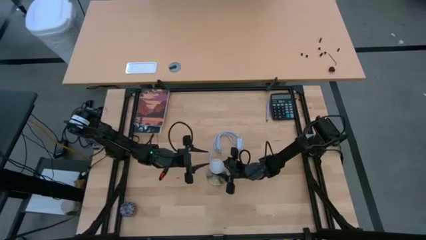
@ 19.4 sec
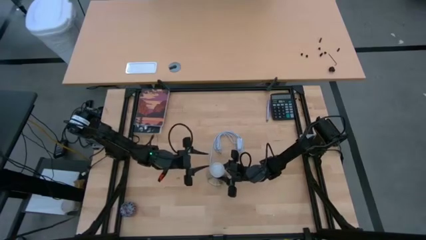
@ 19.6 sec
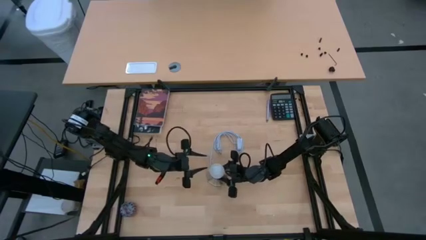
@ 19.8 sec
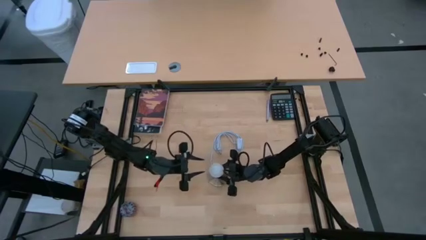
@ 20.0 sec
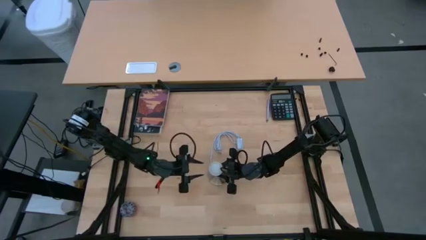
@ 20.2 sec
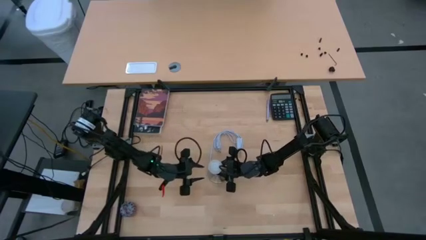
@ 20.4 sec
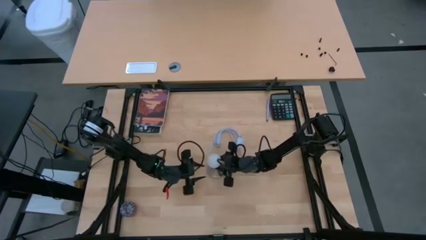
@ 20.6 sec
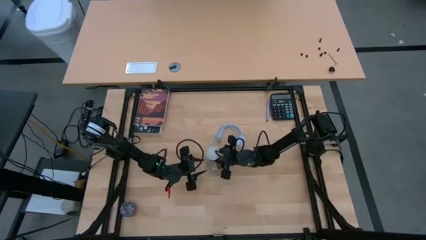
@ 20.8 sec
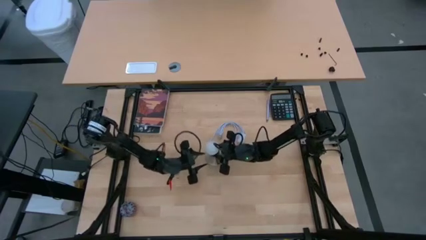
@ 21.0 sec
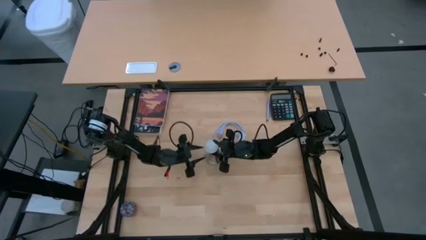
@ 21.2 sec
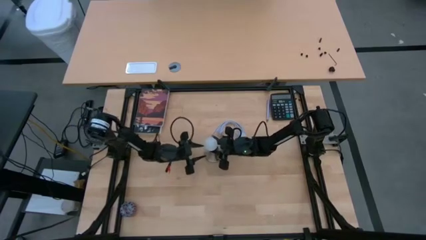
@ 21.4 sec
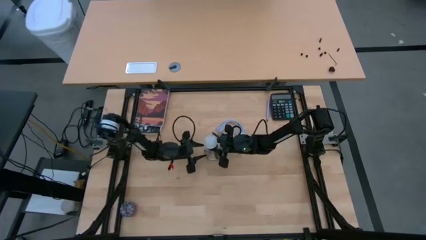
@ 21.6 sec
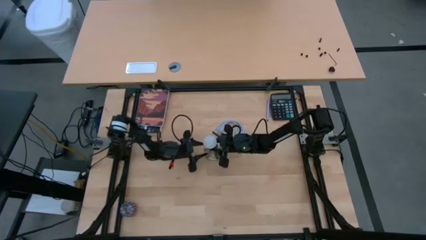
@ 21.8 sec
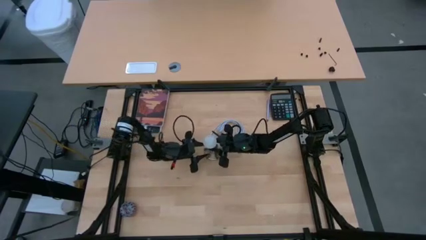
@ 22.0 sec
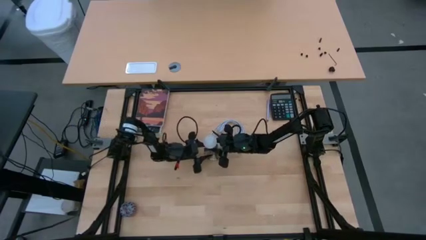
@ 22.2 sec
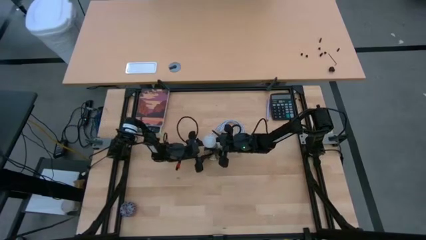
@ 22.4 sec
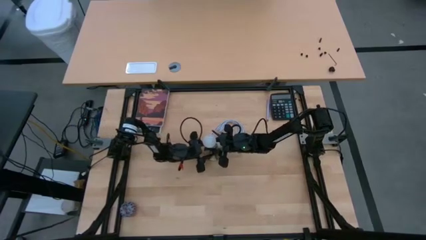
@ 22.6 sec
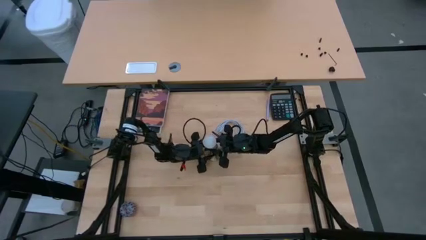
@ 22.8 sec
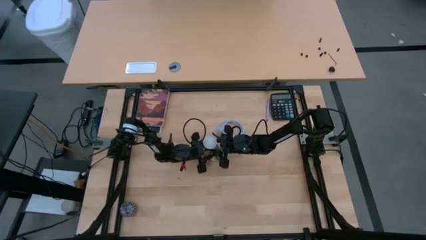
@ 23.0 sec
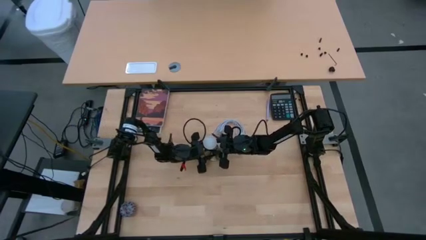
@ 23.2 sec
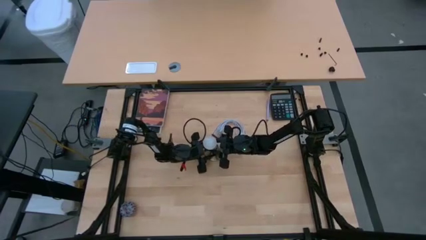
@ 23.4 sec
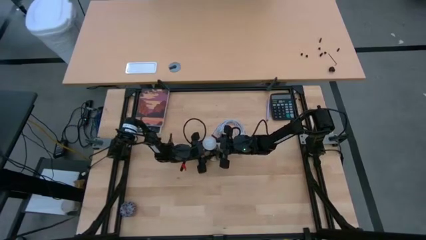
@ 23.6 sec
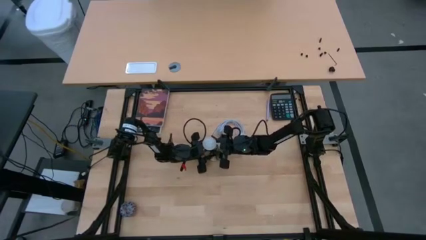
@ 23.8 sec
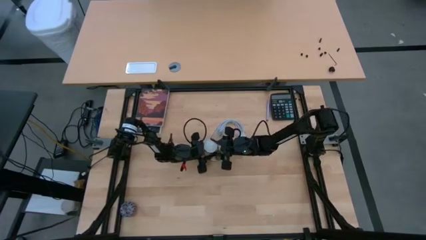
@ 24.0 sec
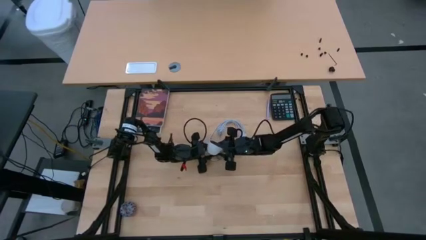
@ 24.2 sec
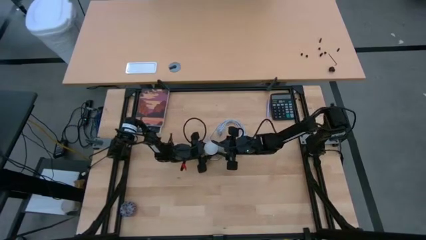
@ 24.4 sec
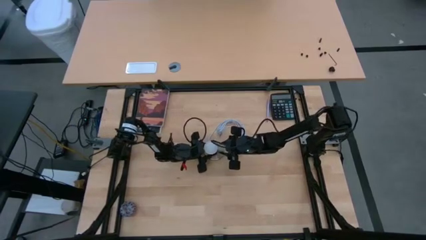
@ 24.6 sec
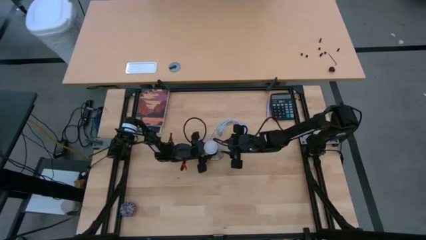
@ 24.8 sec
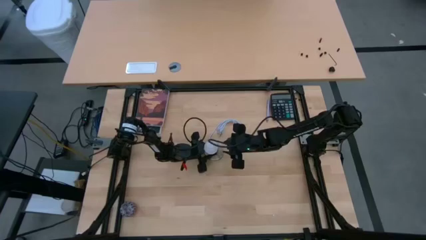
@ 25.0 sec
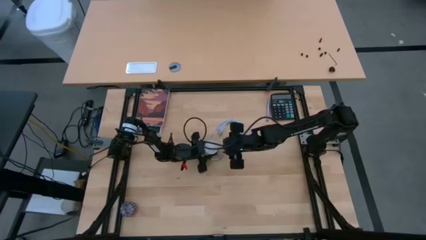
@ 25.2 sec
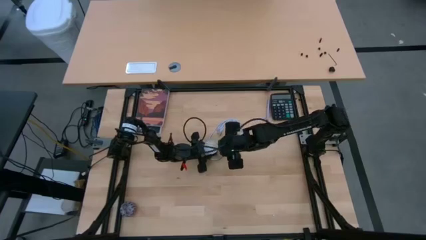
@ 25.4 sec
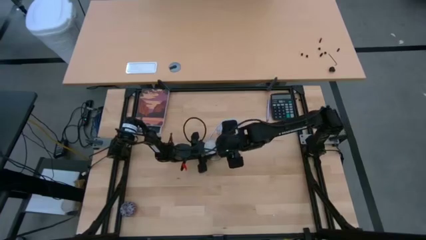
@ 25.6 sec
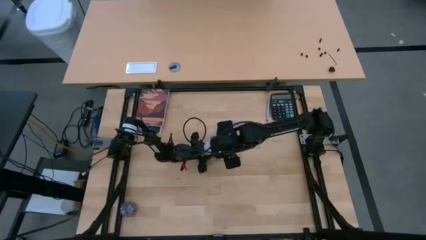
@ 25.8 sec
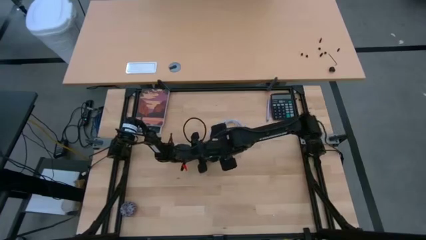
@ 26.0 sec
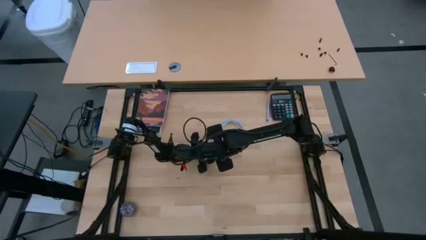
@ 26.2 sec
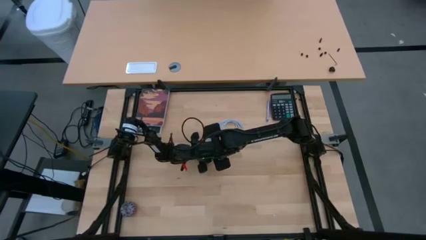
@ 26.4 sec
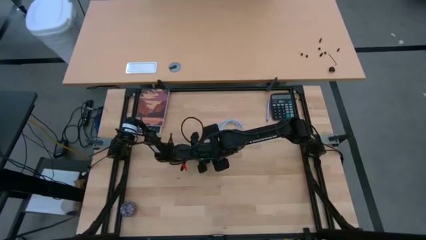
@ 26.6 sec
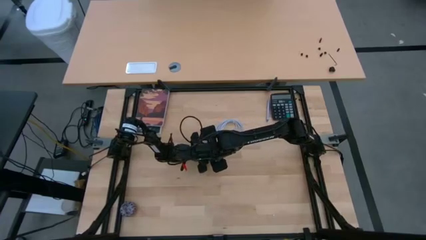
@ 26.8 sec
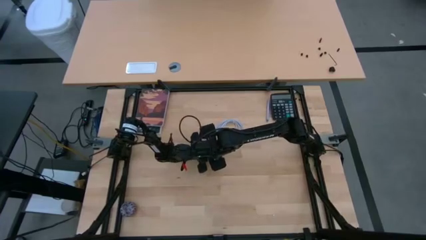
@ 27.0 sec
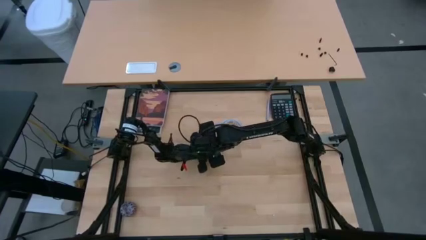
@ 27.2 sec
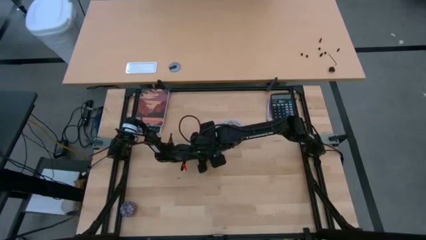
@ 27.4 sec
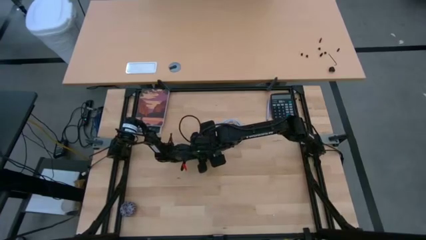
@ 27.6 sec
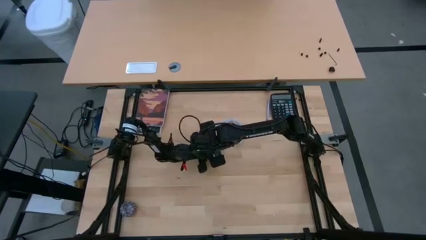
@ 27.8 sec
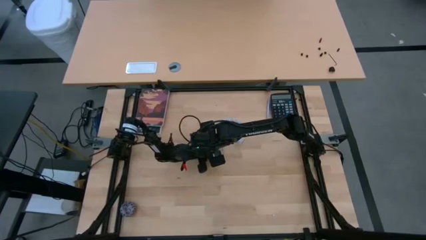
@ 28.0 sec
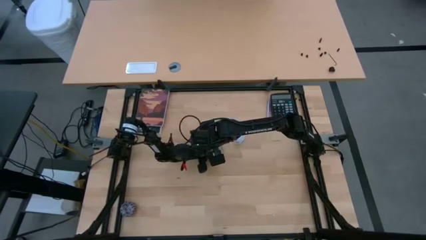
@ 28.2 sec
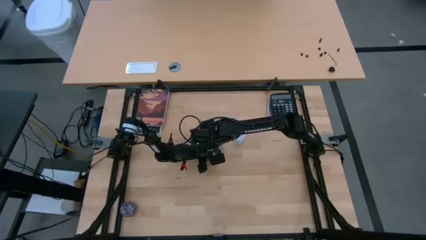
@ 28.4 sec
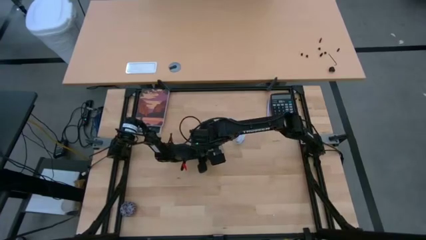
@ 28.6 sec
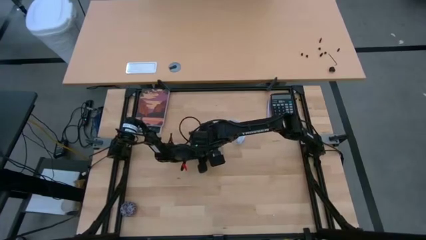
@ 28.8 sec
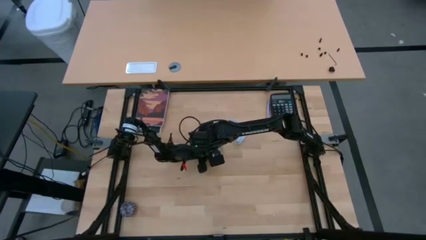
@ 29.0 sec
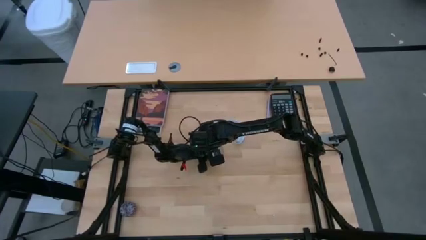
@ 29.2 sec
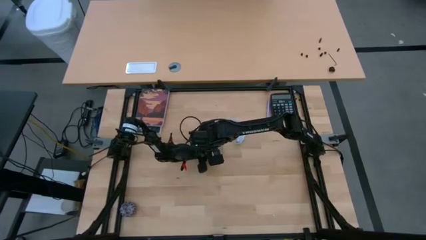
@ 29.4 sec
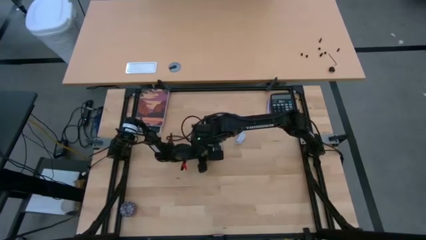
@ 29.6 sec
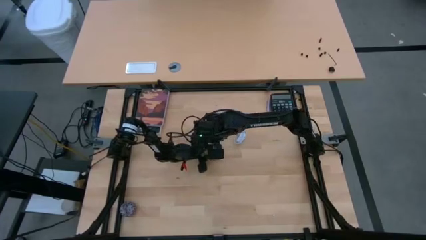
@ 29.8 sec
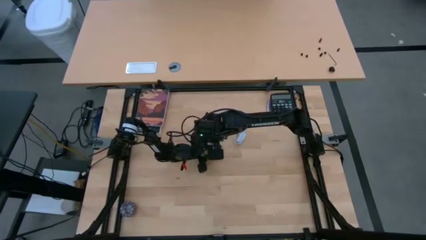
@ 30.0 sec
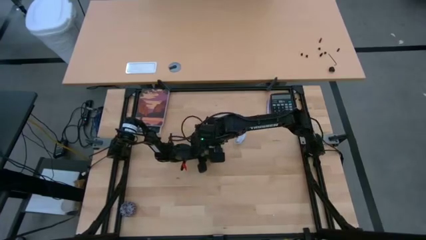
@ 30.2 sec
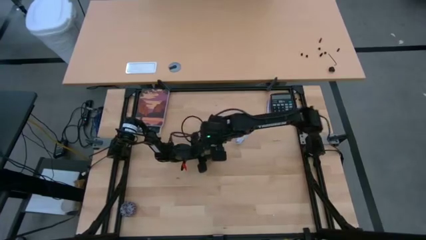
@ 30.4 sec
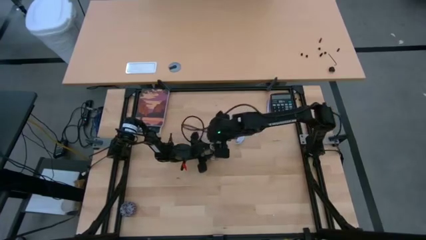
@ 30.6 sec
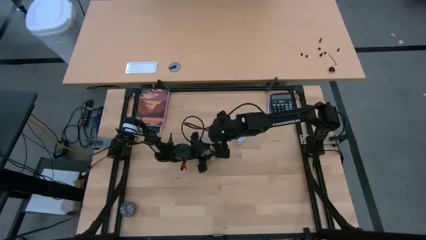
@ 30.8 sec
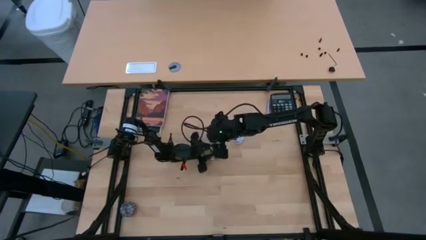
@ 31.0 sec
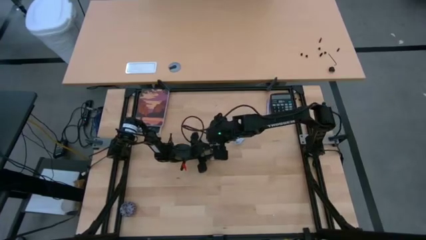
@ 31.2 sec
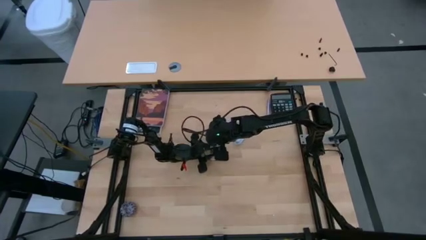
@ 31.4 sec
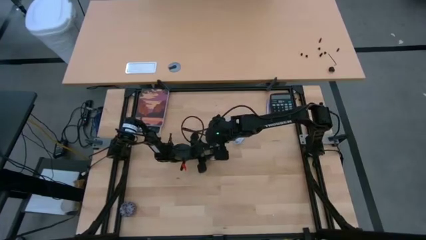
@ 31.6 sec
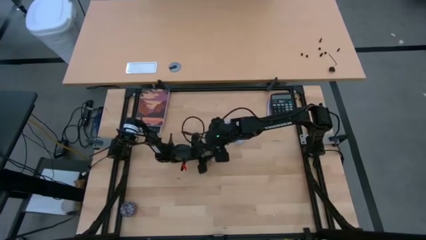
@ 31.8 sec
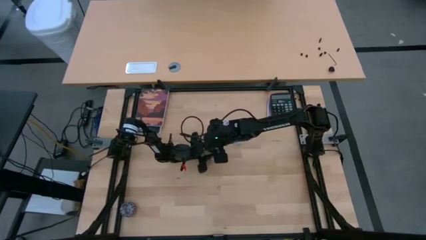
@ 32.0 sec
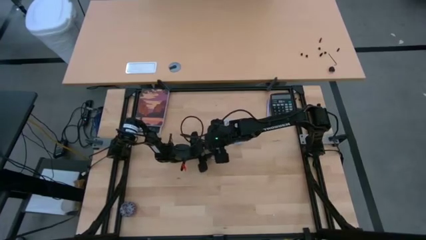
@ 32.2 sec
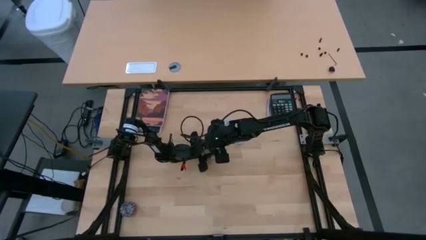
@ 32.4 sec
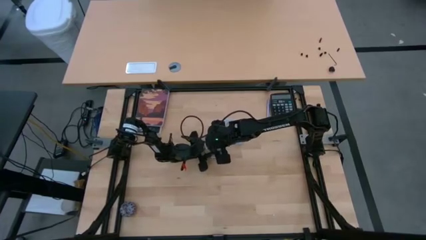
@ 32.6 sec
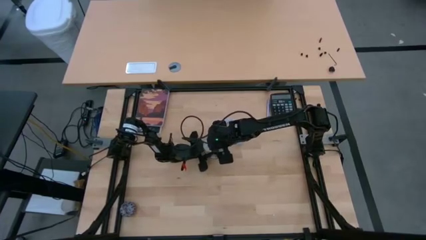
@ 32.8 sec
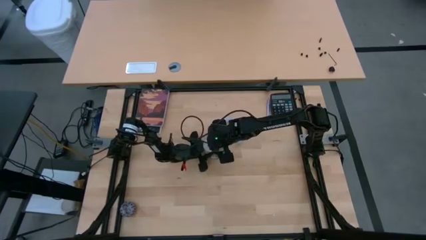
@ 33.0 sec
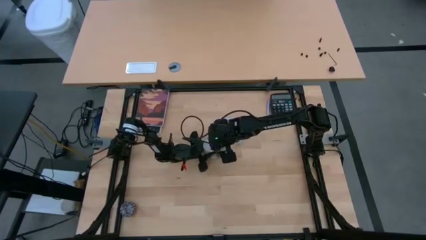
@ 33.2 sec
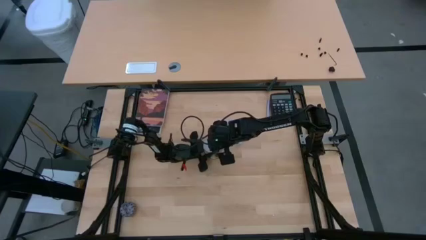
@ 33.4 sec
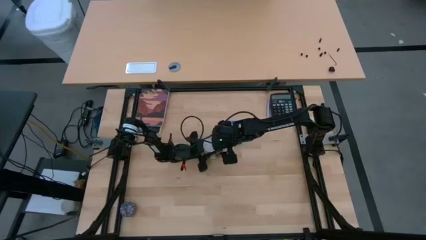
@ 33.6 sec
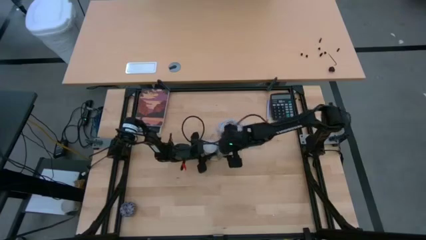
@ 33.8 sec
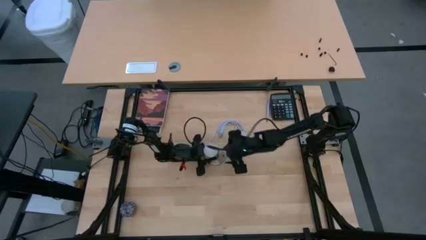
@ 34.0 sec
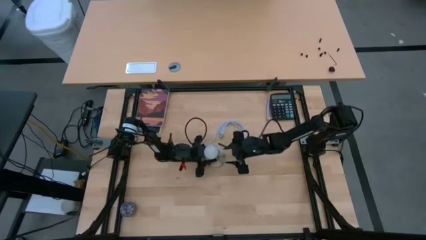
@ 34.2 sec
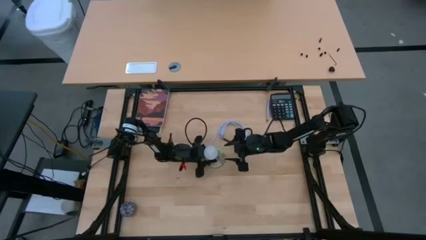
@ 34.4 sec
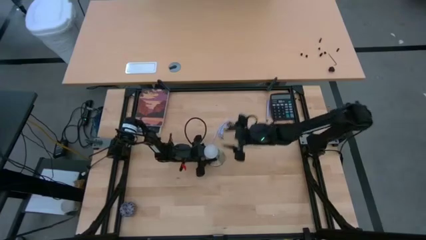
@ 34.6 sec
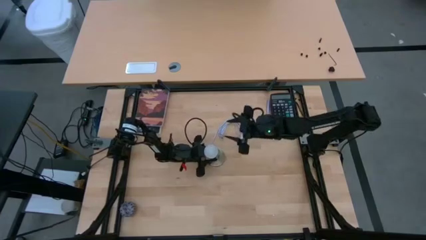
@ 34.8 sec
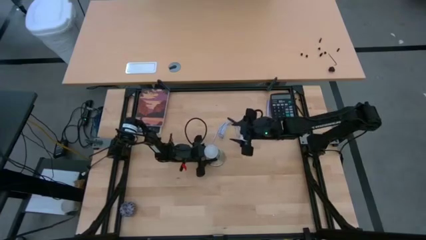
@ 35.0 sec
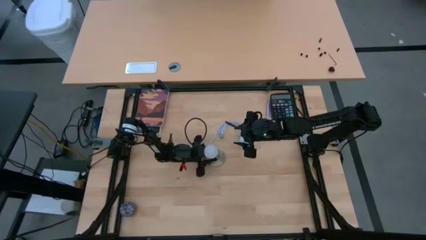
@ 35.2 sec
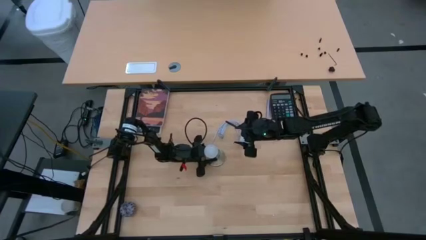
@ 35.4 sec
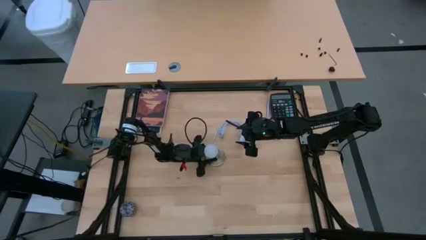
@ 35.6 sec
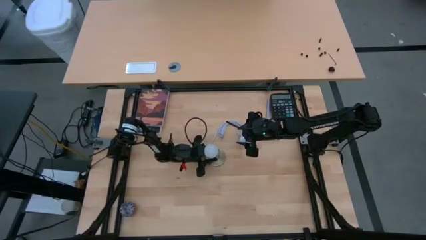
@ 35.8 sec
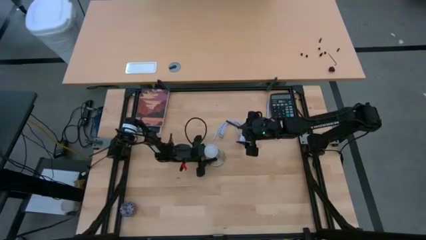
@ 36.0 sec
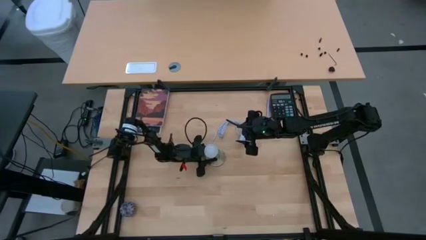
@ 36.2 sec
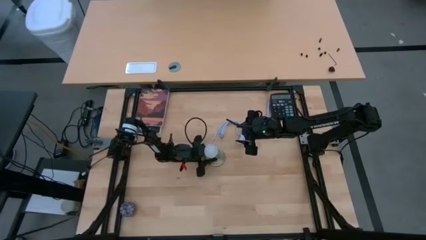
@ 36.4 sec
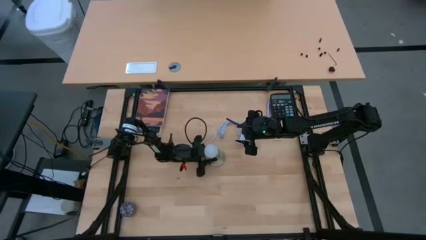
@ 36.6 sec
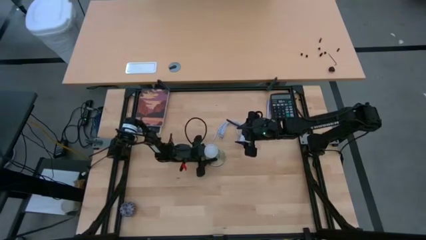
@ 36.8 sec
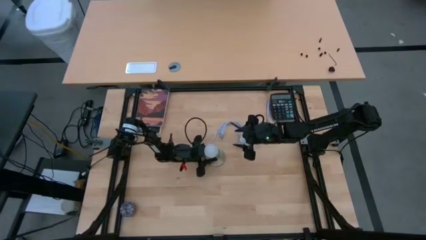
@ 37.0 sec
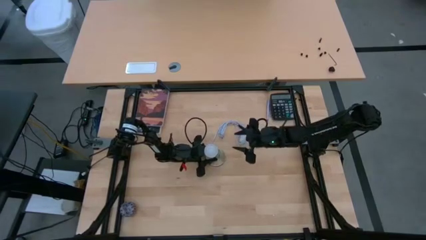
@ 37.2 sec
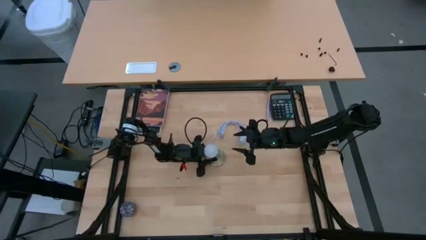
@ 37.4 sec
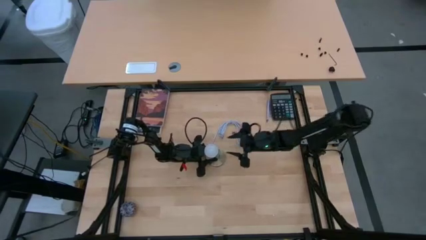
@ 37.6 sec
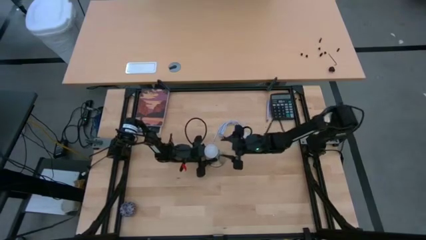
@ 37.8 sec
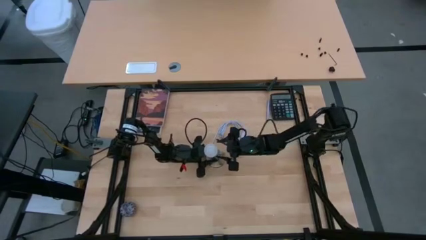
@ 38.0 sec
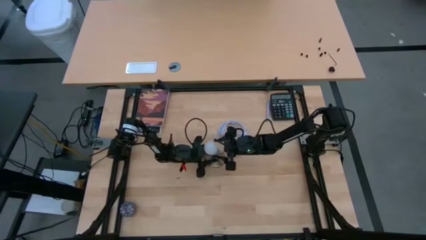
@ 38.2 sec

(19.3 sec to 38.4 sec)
Task: Screw lightbulb
Insert the lightbulb into the lamp
